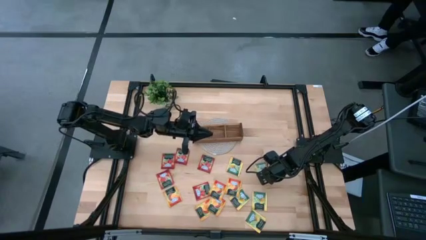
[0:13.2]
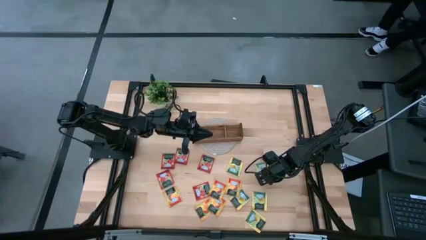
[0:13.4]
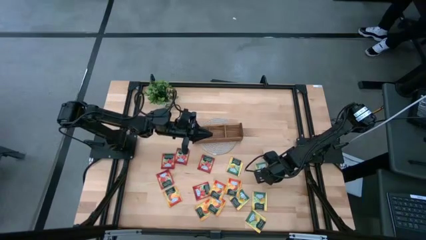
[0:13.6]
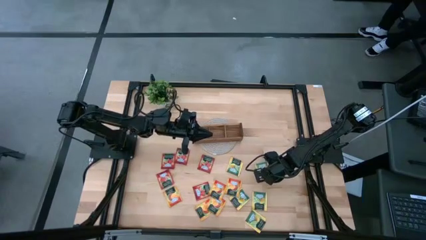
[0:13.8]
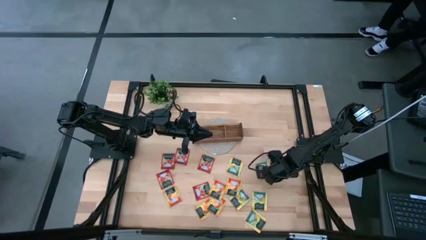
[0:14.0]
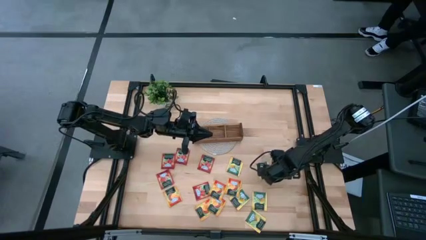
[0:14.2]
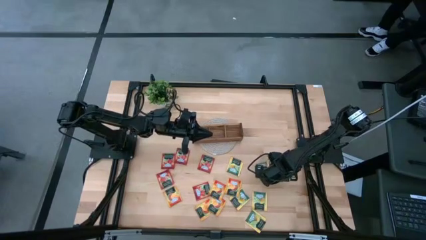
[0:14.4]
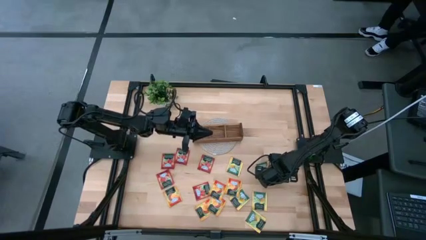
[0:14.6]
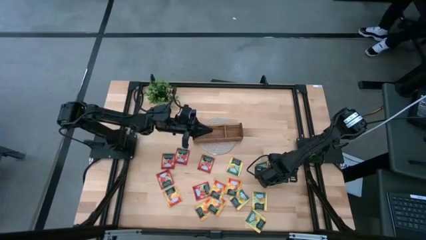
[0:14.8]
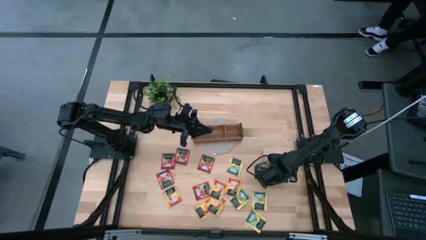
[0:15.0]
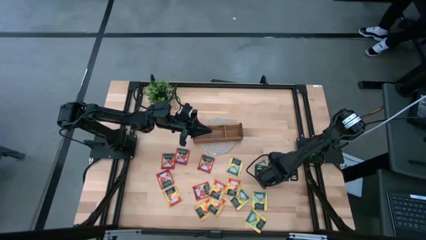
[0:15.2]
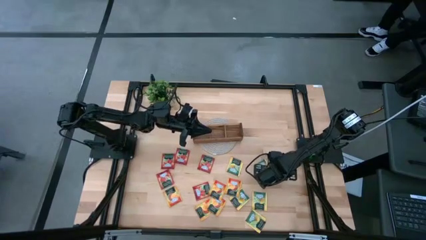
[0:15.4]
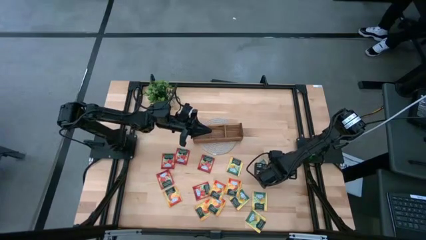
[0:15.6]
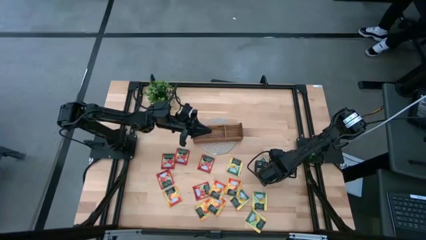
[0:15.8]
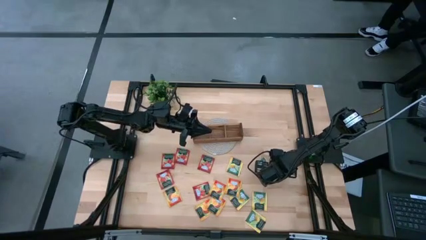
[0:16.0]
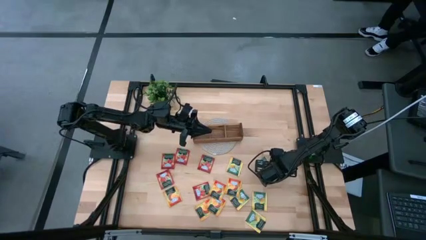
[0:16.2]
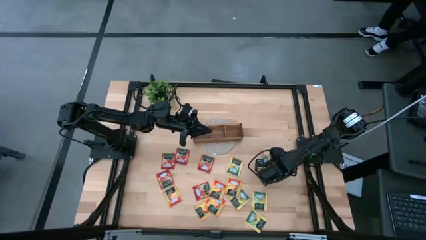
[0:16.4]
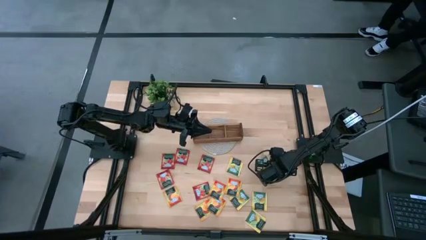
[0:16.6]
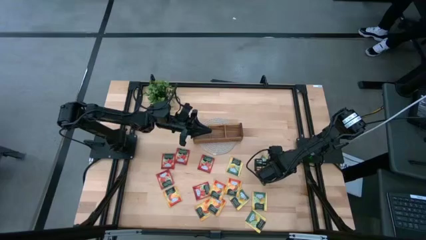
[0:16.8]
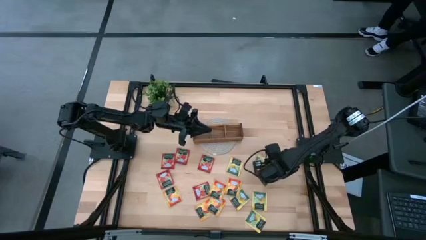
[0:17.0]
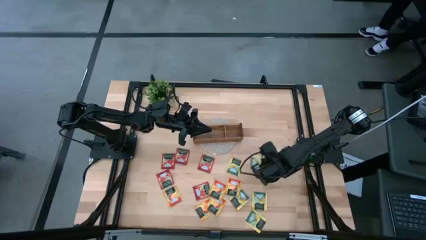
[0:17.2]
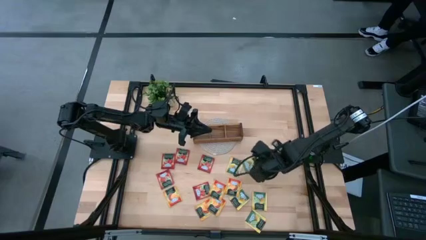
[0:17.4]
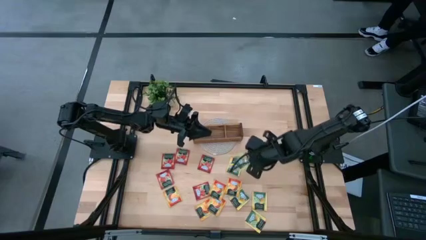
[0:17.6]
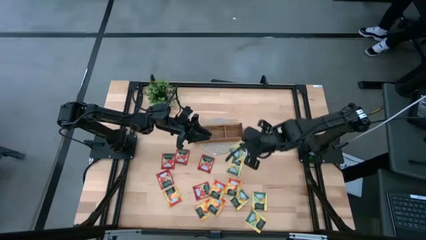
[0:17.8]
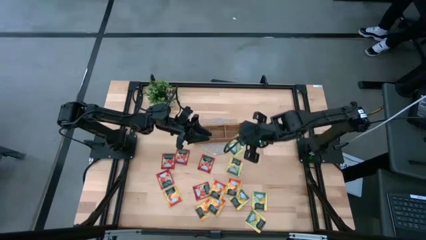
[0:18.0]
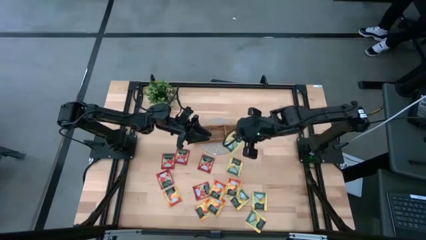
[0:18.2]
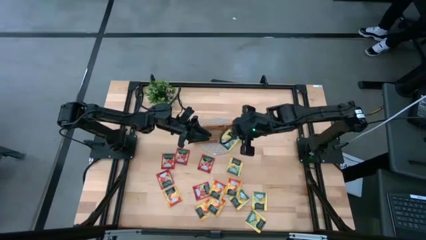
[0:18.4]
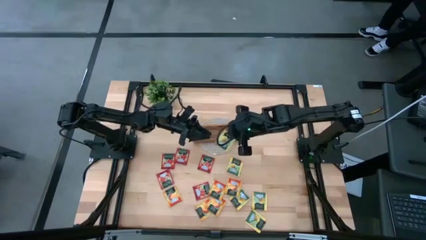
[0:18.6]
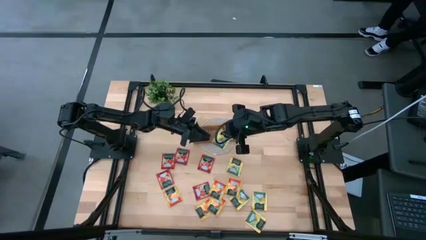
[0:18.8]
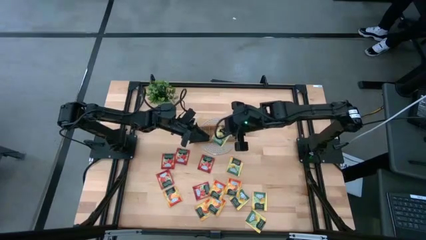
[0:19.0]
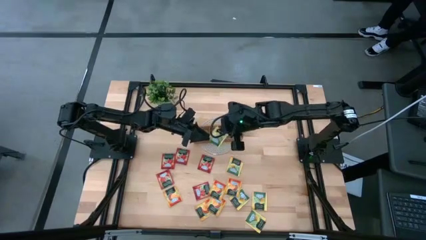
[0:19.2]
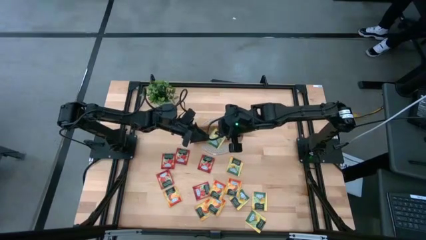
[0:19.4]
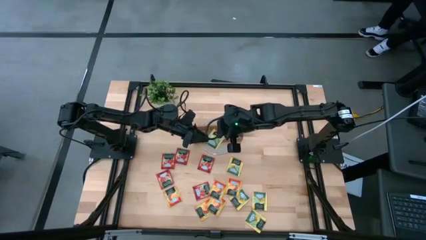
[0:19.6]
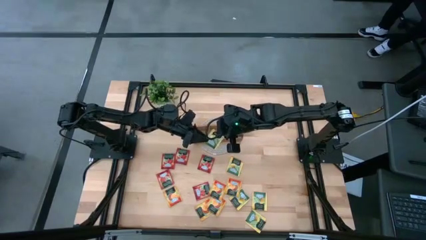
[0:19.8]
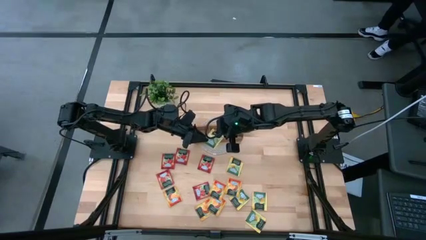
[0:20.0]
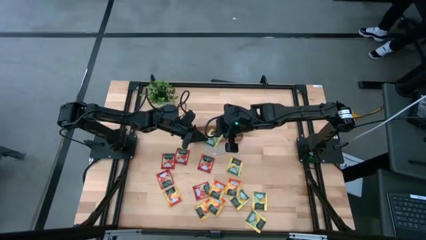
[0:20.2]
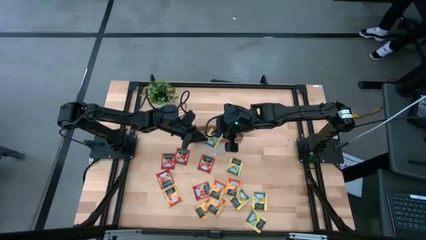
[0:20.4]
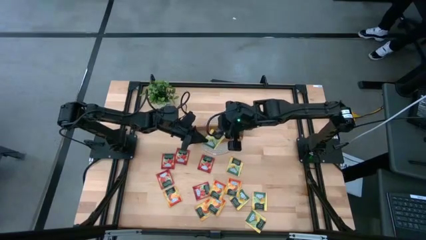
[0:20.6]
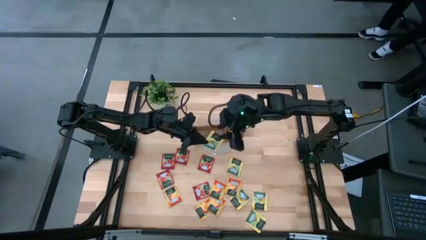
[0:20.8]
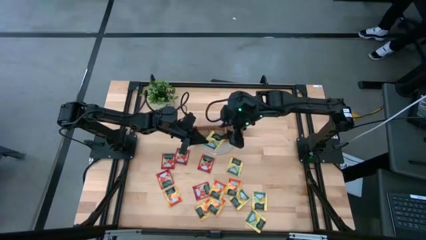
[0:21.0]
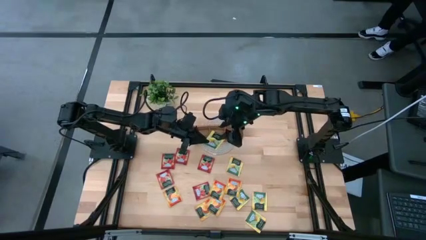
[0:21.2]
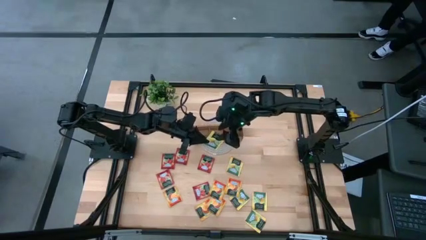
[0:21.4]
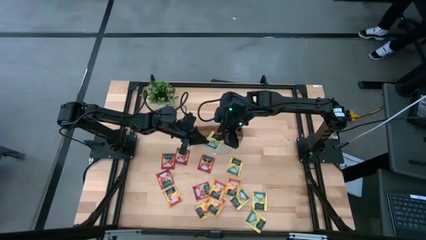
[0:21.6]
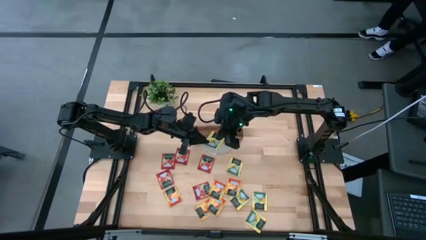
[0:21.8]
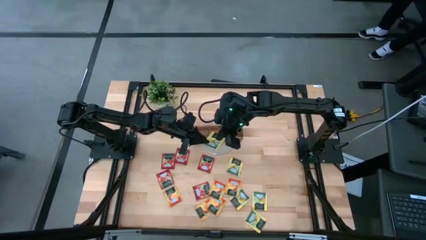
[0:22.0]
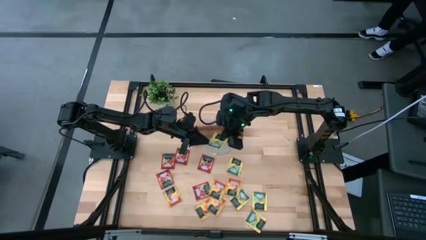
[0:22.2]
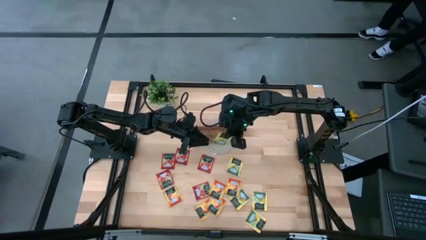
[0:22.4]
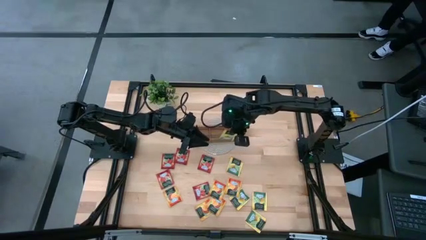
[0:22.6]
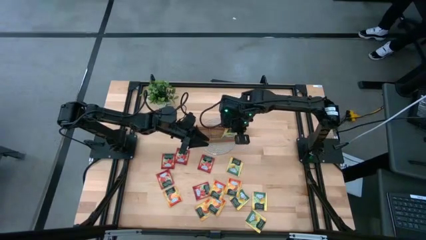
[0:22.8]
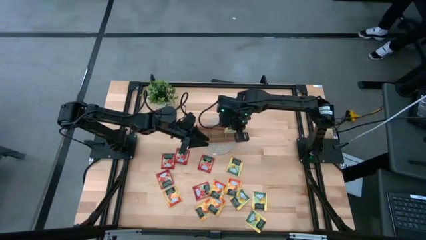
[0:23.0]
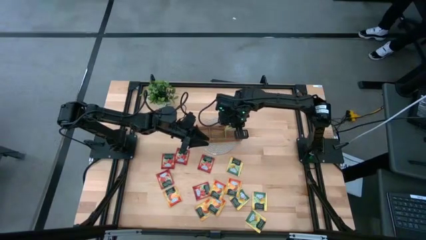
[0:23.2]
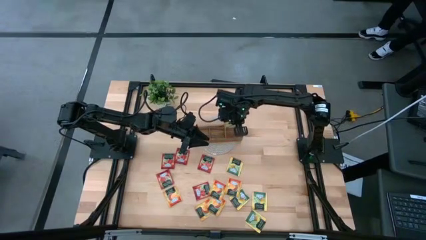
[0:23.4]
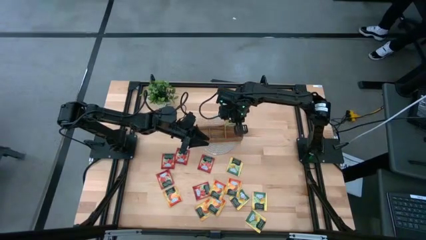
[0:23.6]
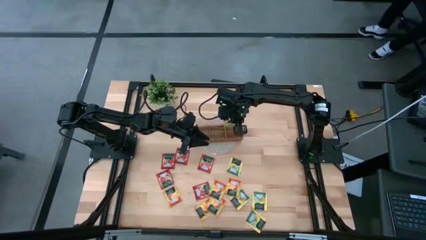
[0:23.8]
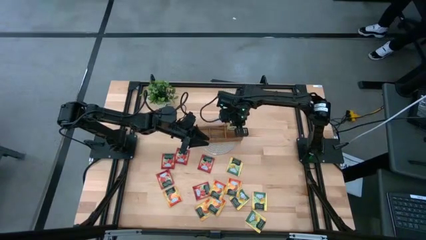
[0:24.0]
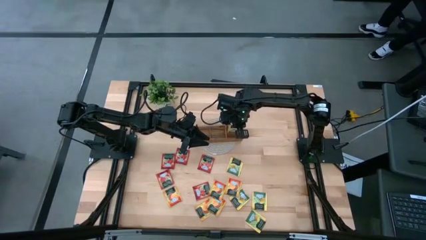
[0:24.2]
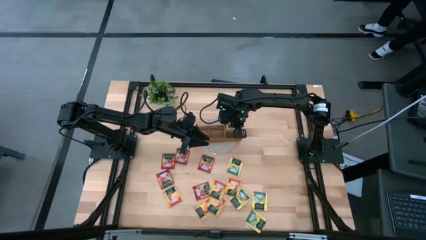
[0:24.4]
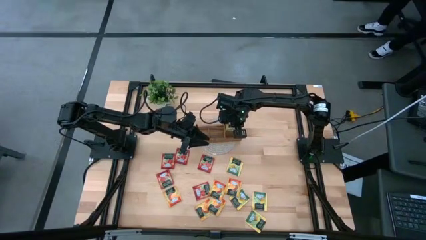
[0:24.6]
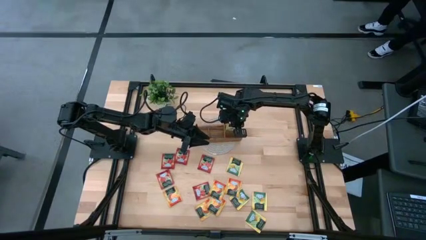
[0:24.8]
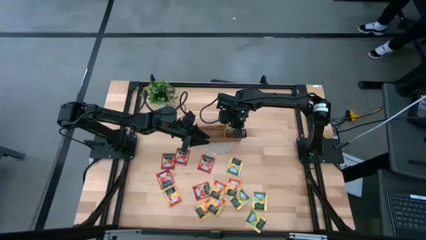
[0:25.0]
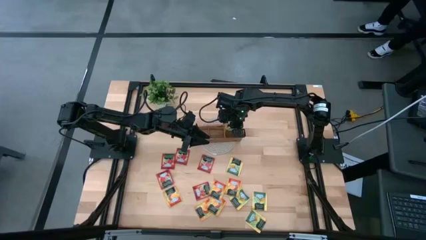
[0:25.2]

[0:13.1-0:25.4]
Task: Pick & Place Tea
Put the yellow tea bag into the right section of the wooden organizer

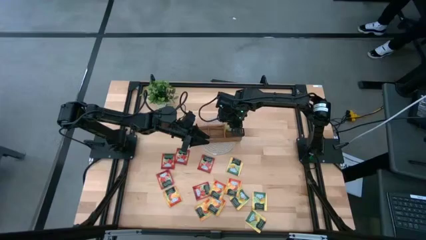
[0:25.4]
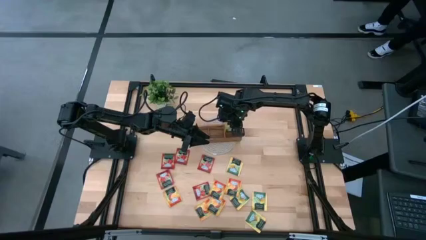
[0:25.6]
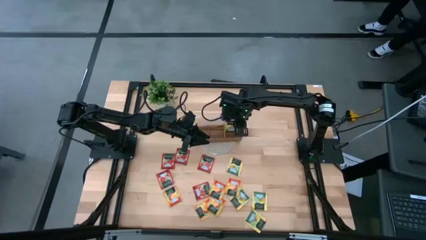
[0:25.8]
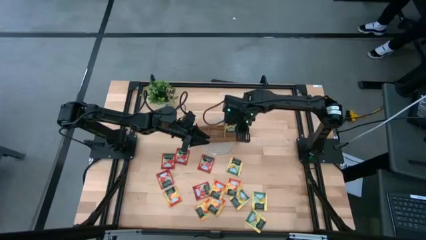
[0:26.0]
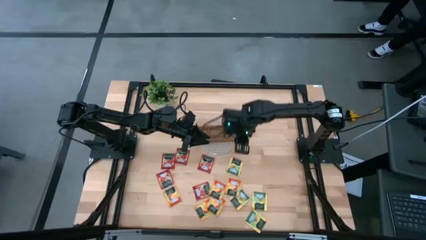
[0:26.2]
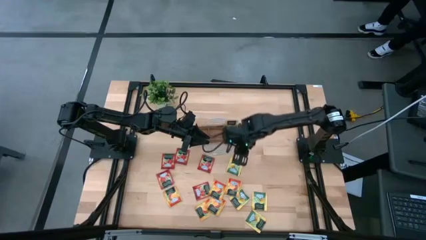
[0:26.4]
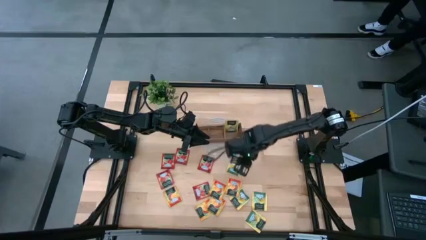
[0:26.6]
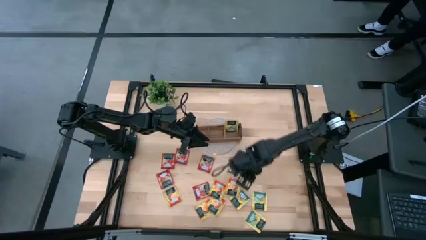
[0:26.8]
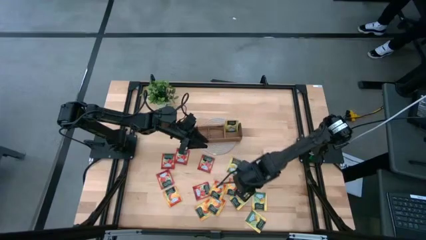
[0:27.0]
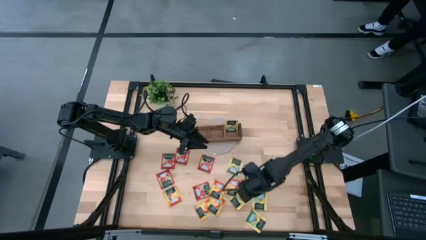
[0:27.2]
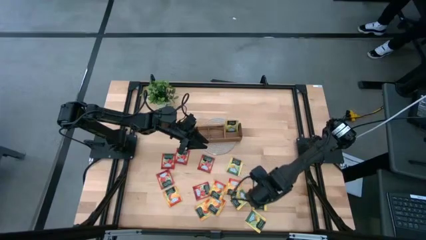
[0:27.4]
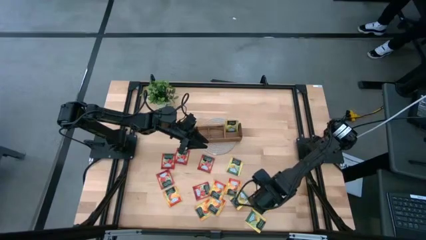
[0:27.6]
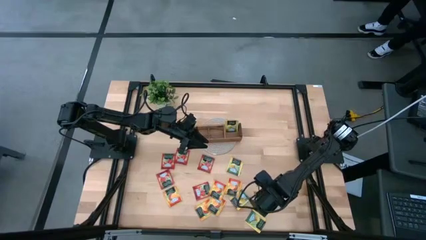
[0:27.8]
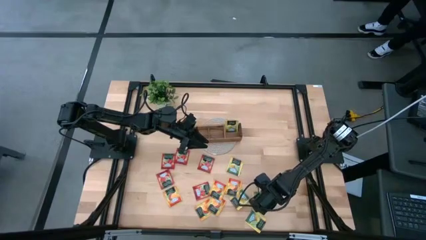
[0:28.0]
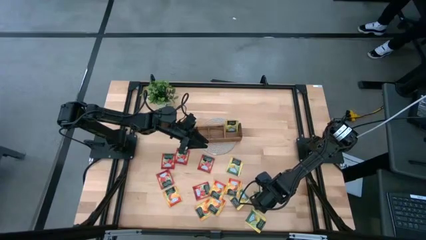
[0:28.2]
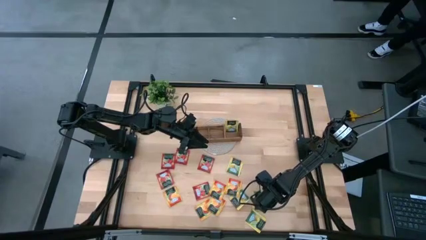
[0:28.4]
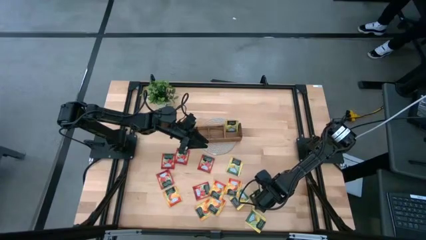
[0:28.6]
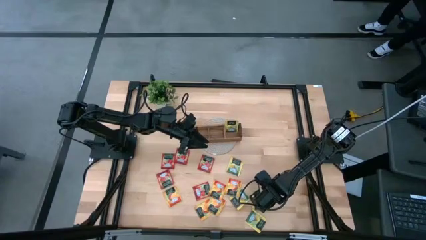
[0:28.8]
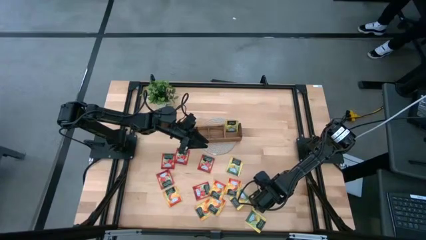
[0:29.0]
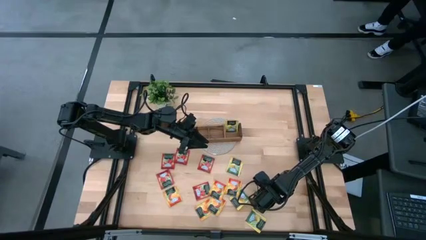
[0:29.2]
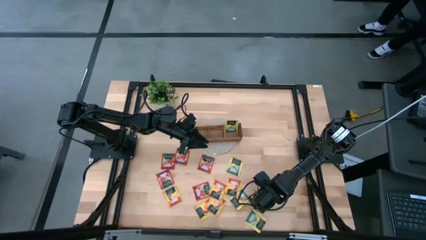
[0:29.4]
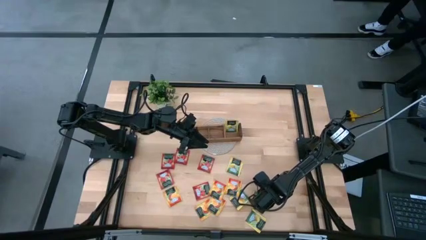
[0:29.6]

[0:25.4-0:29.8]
Put the yellow tea bag into the right section of the wooden organizer

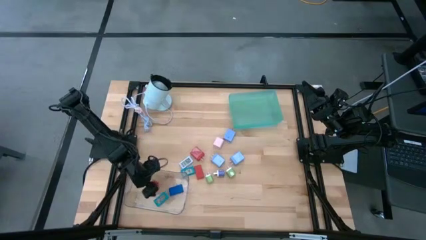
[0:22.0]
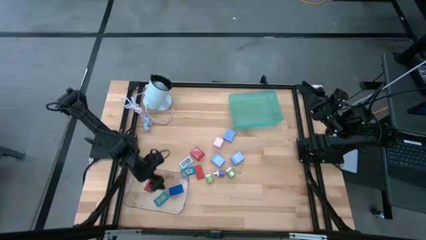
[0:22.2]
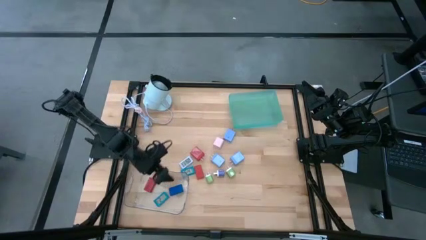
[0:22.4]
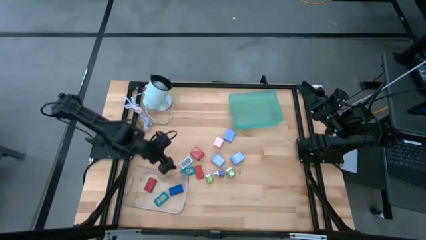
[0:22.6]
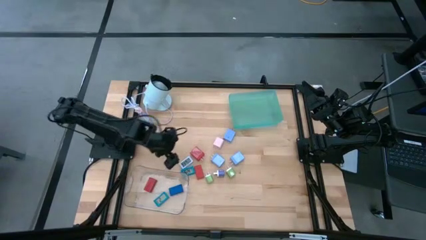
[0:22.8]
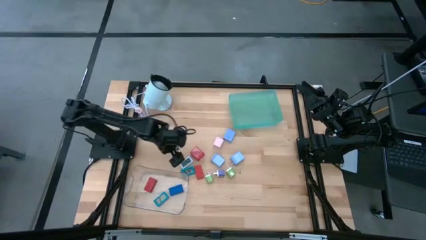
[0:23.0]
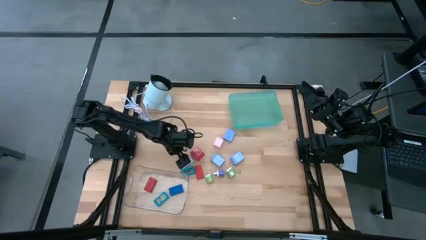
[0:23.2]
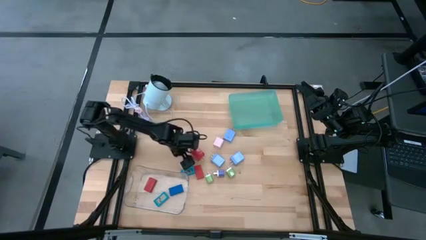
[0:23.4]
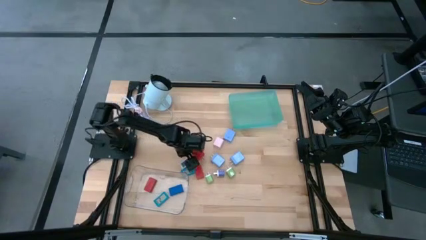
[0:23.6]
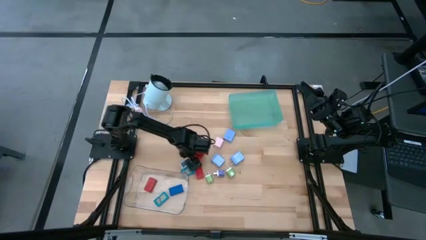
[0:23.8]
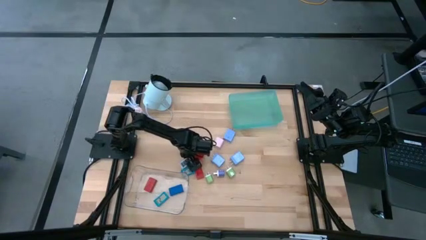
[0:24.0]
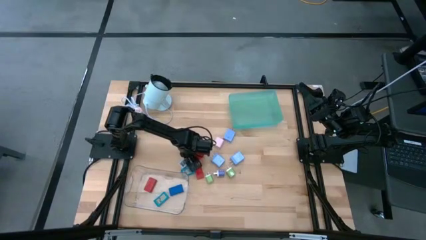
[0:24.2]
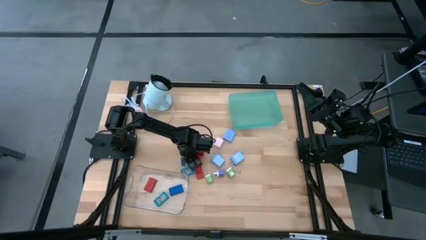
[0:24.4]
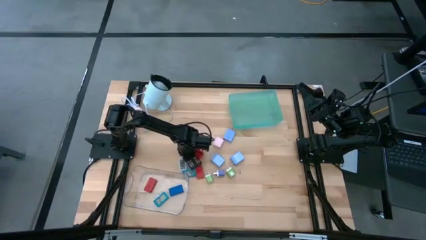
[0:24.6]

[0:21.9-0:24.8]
Task: Pick & Place Office items
Put the white digital clock into the transparent bin
